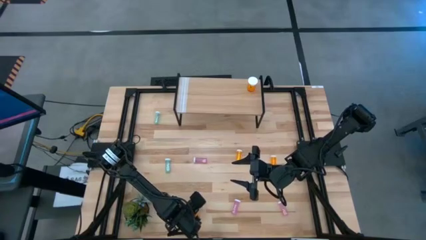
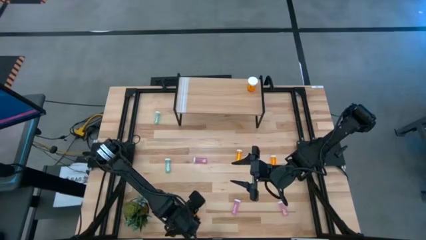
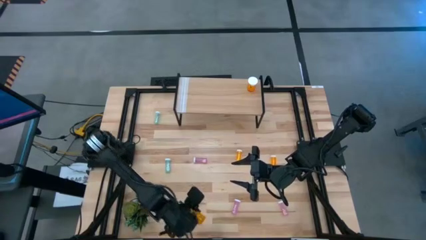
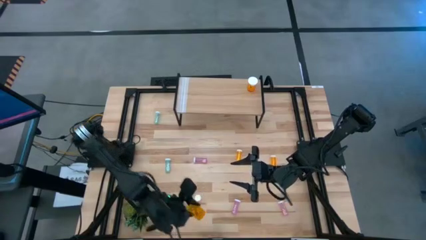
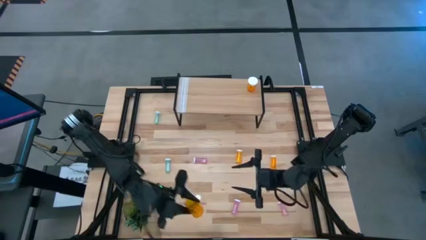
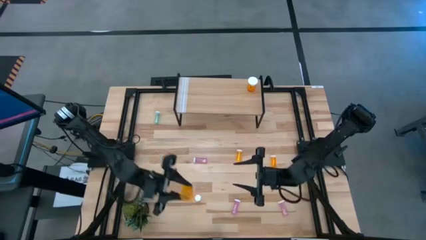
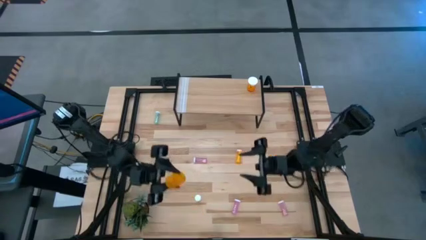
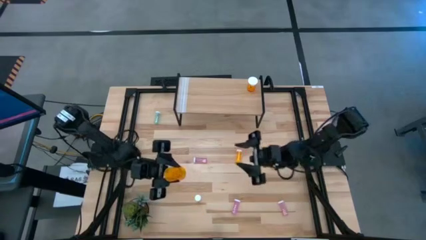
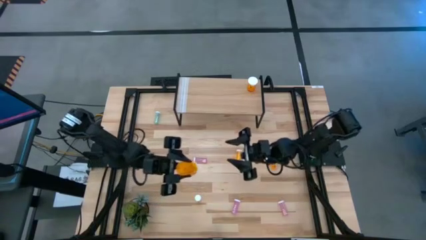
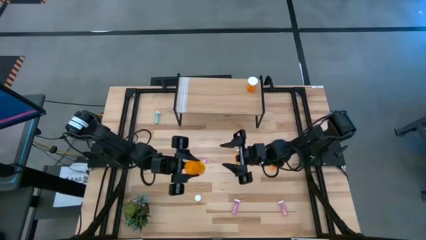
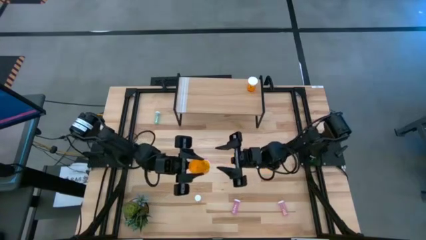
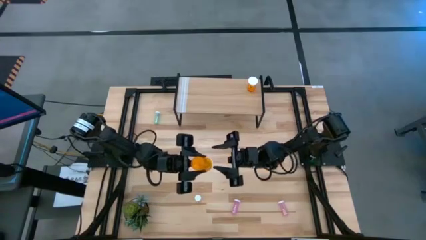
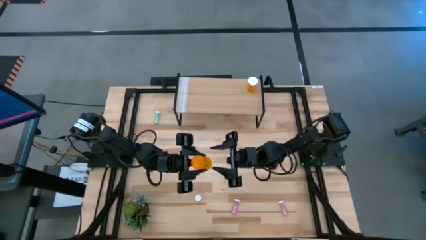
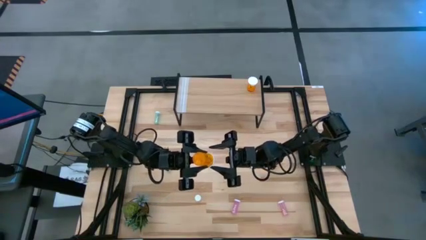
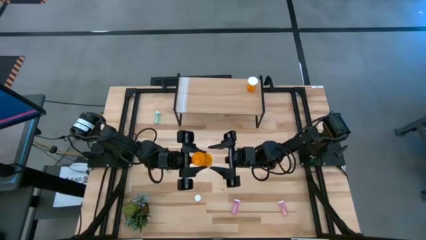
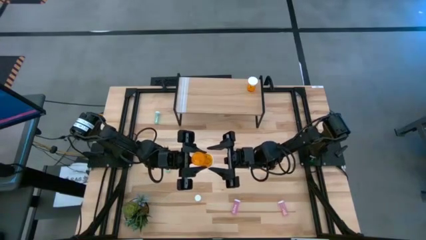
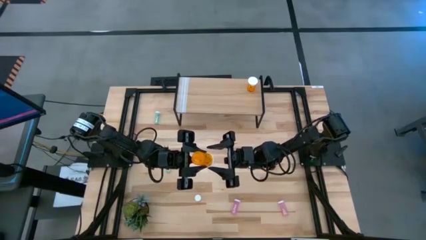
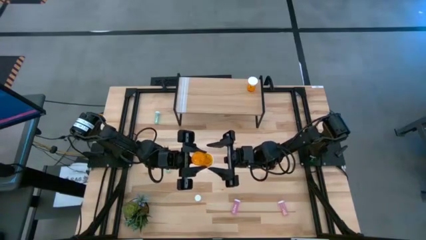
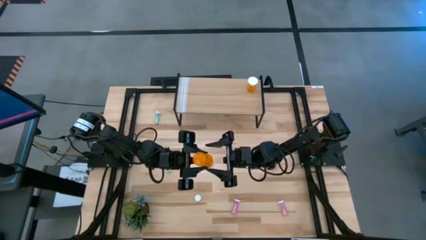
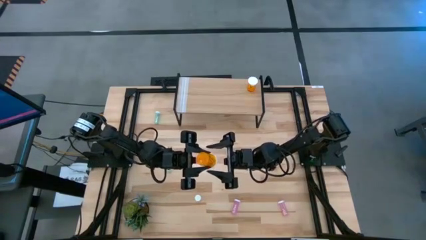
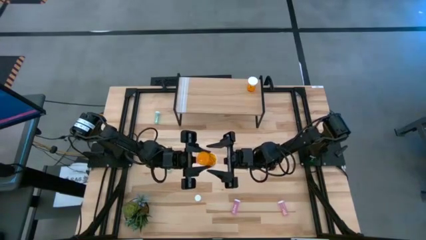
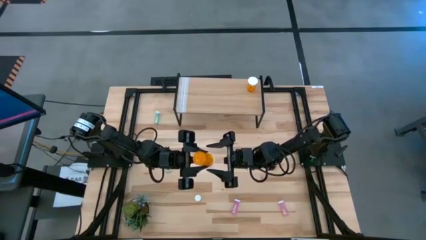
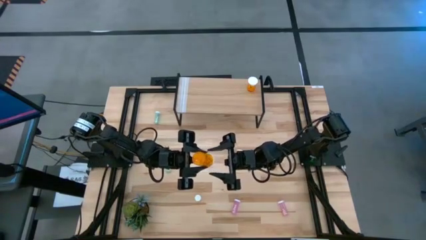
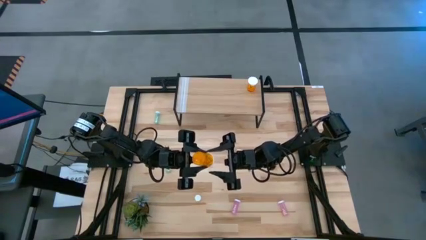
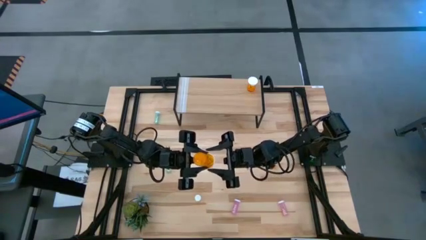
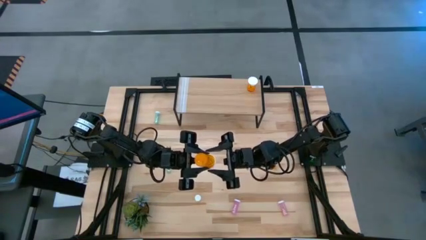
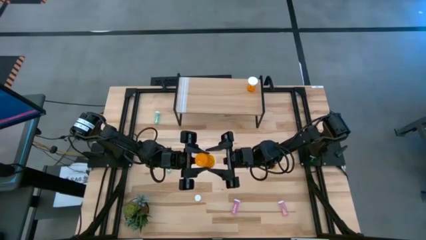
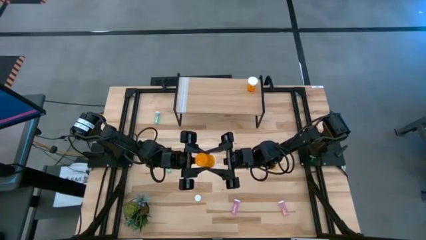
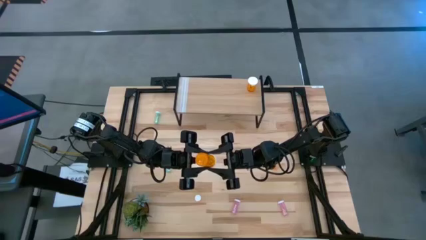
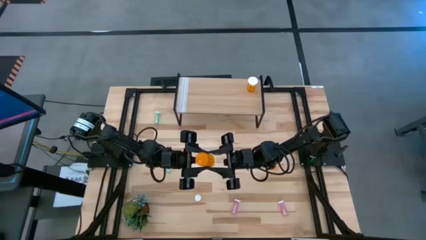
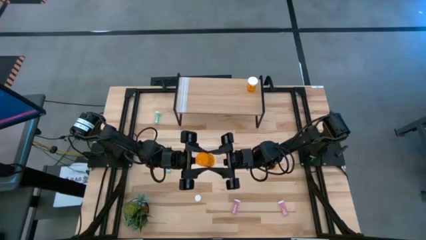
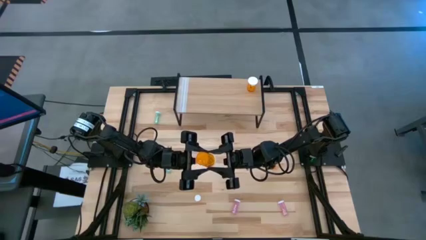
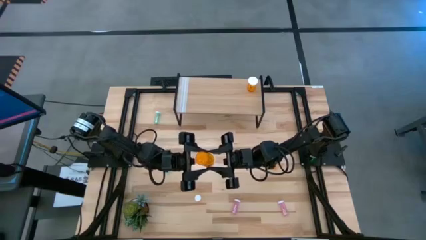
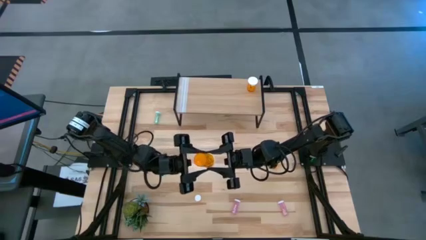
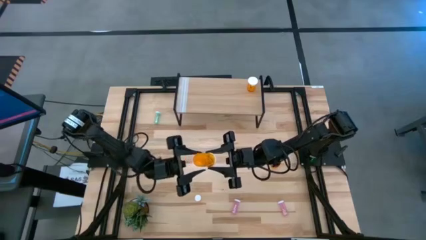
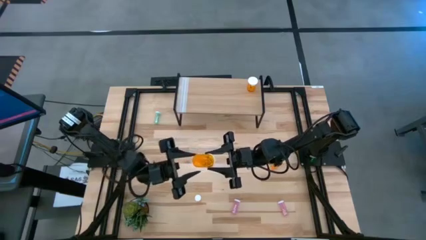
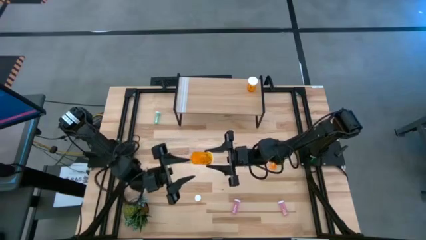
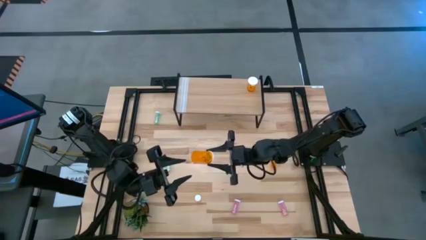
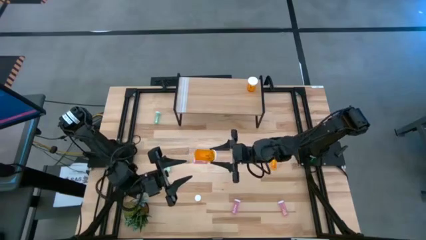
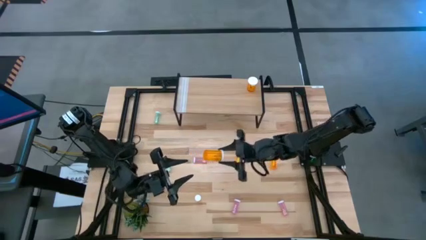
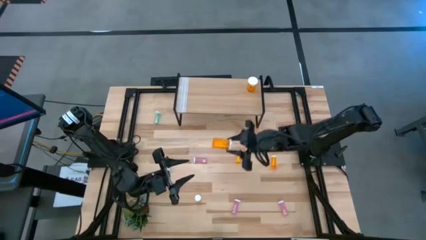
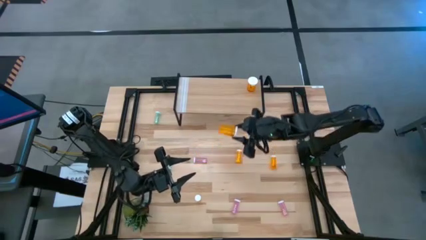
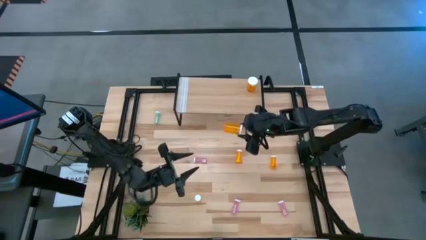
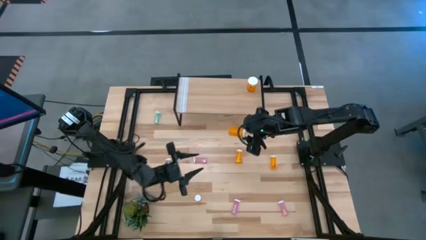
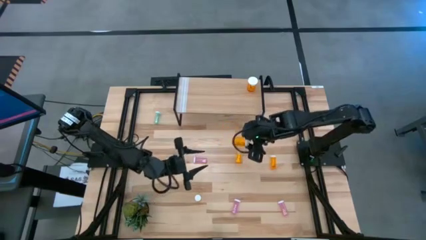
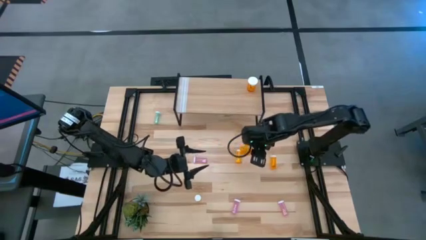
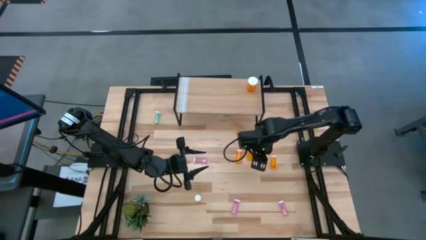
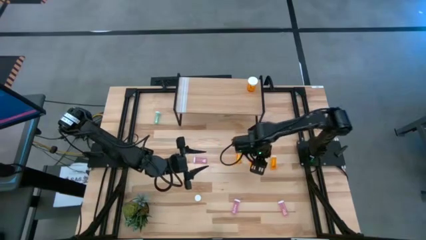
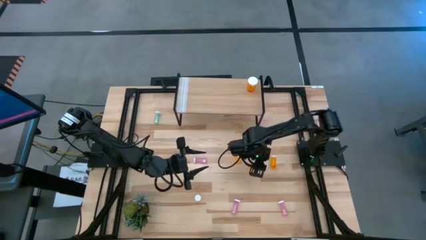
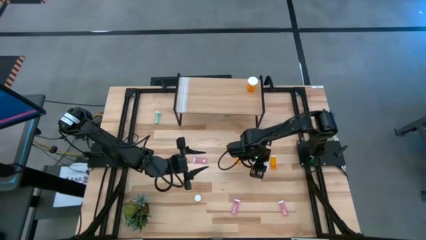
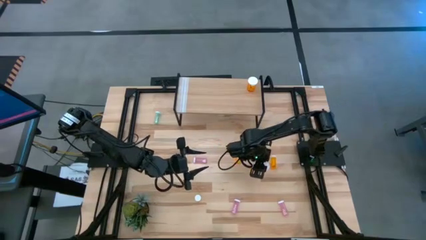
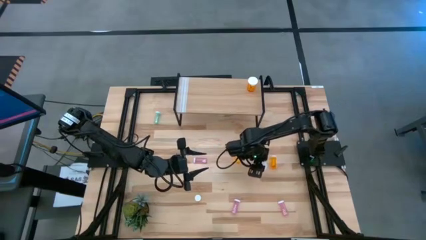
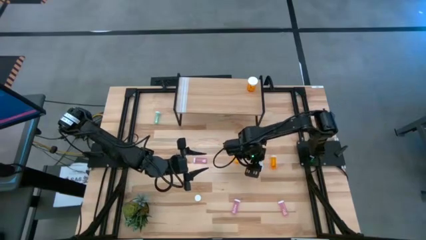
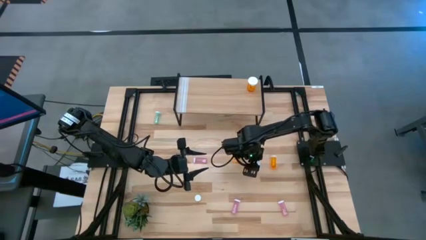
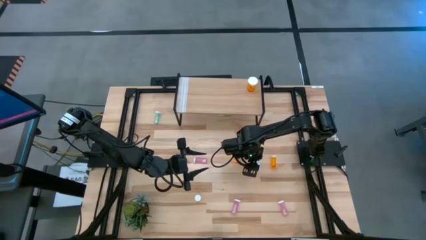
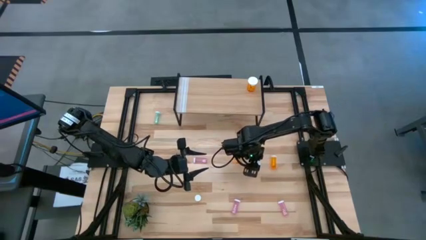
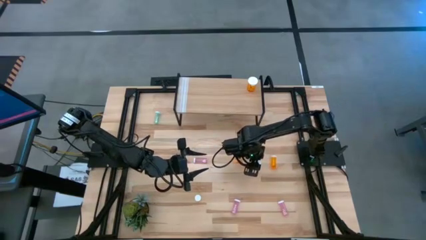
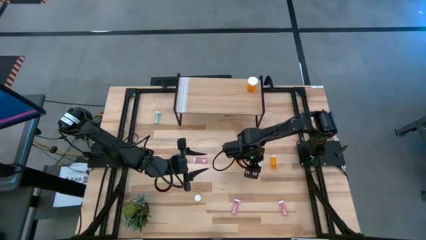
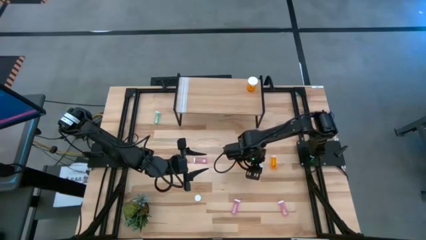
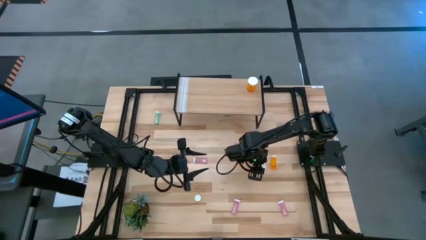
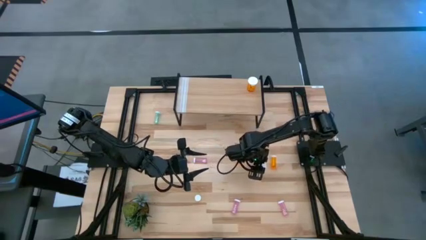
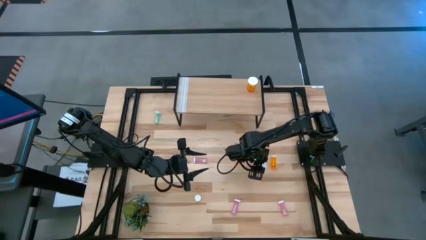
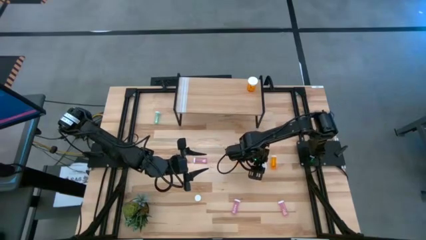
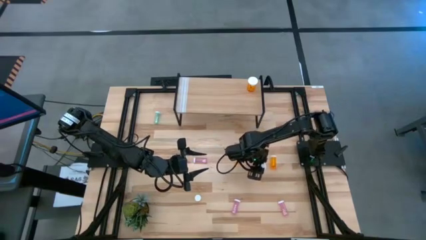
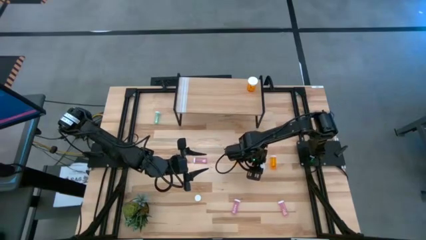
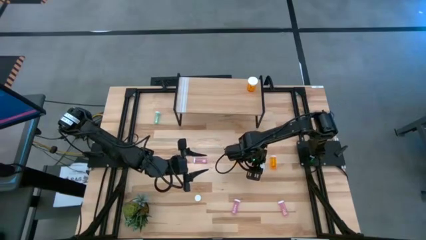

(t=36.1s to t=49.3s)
Task: Pick and place medicine bottles onto shelf by color
Put the large orange pill bottle on the shelf aligned with the other large orange pill bottle
